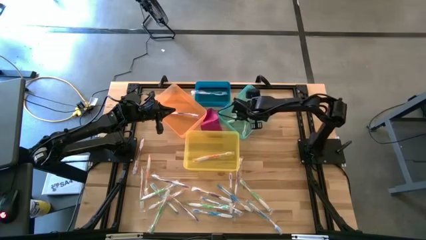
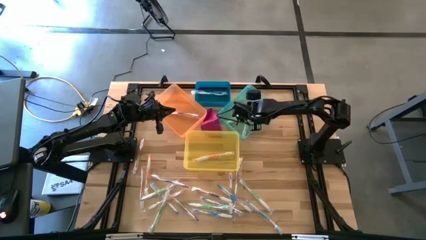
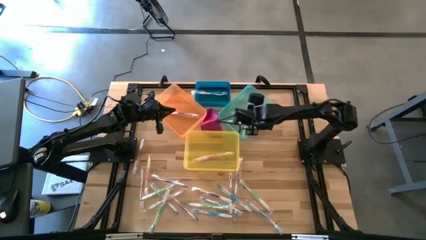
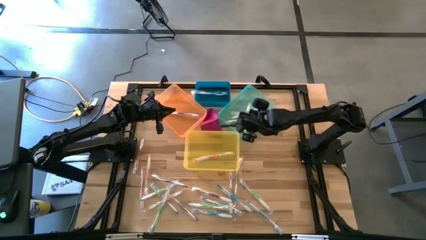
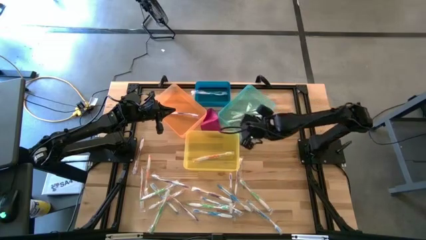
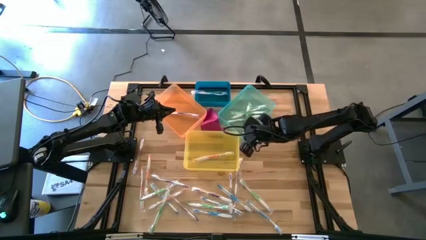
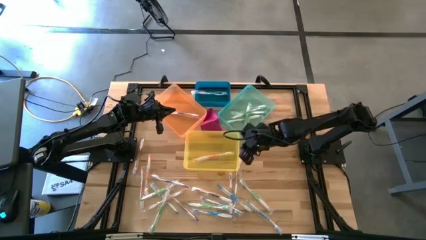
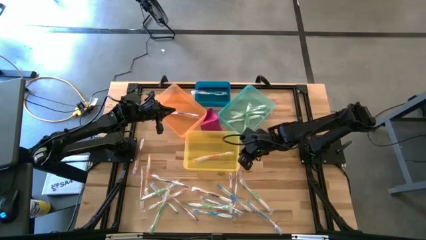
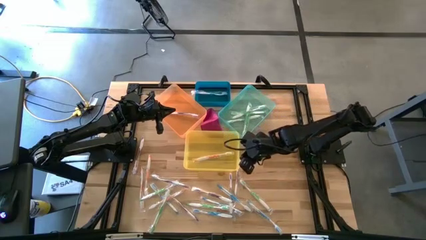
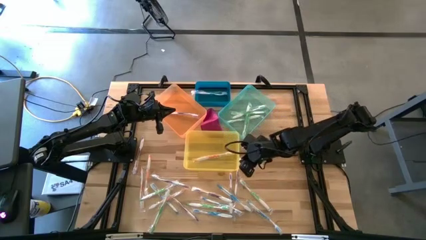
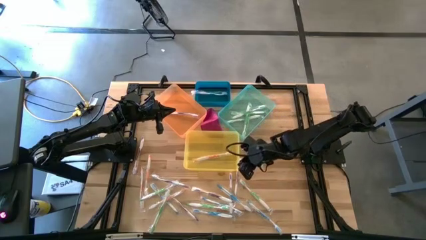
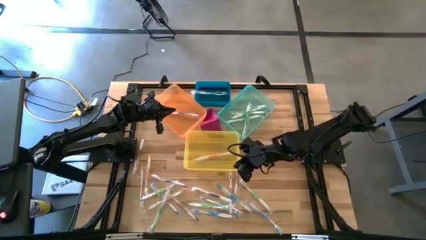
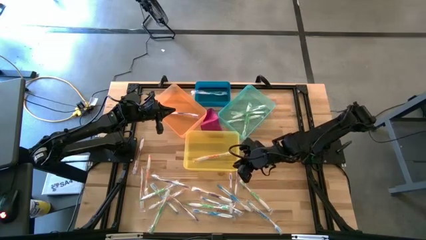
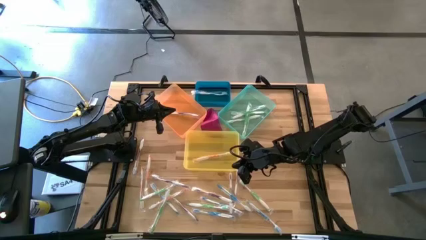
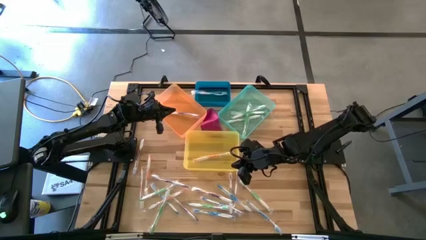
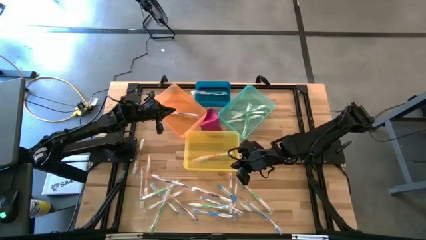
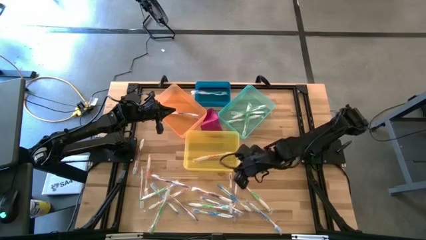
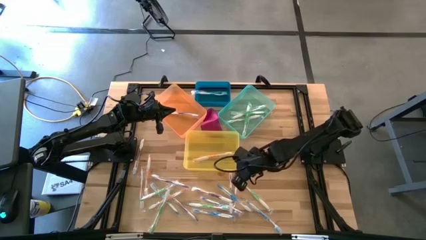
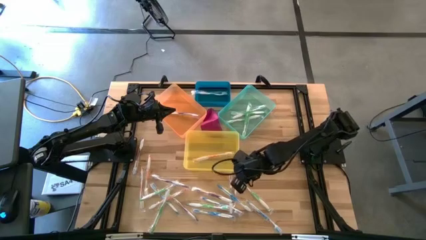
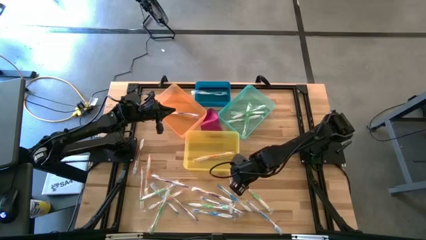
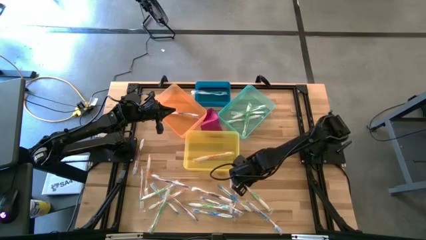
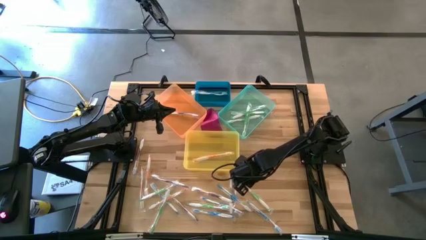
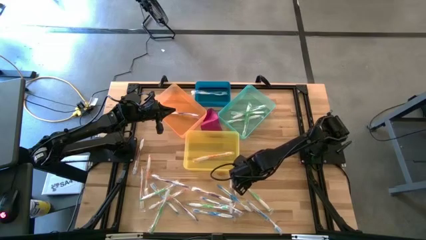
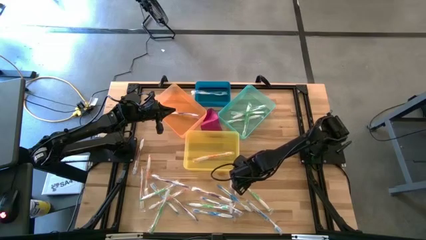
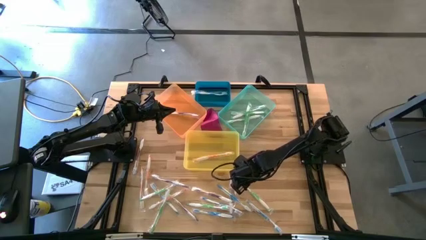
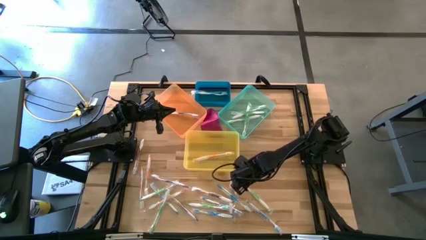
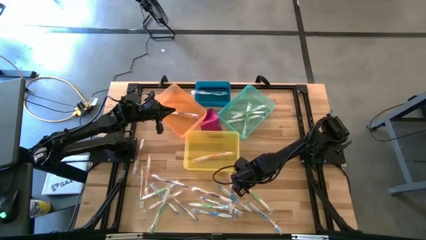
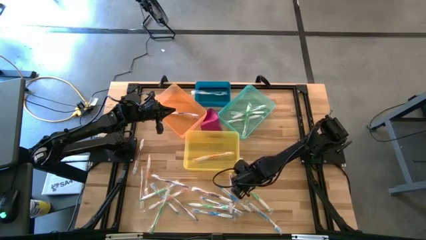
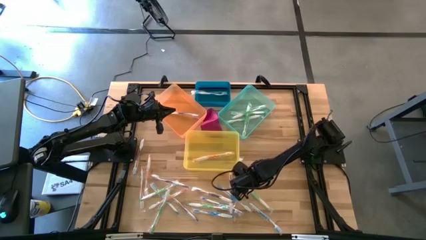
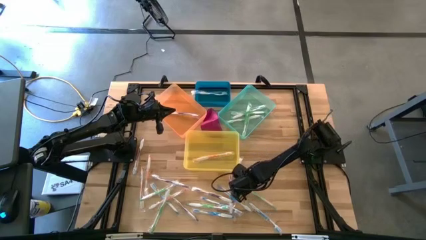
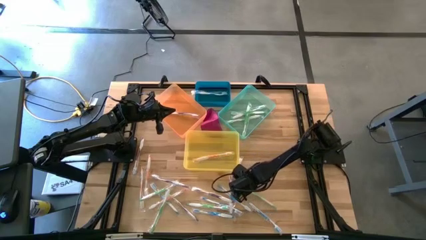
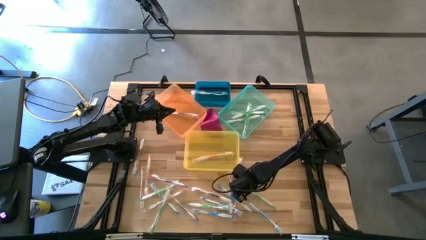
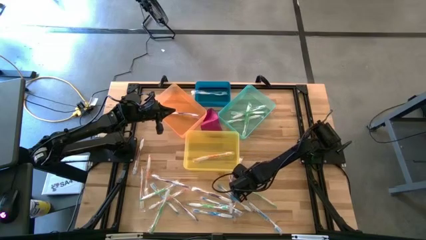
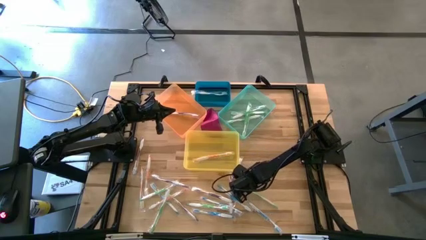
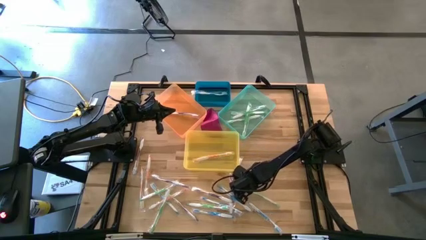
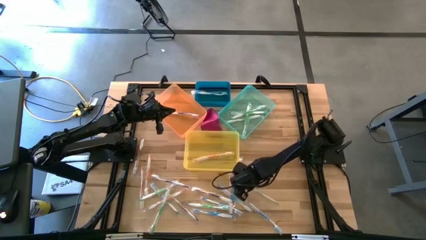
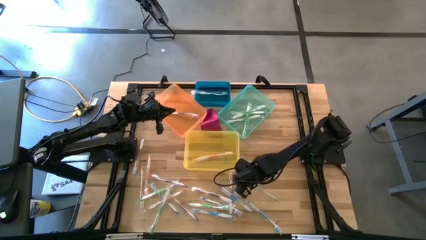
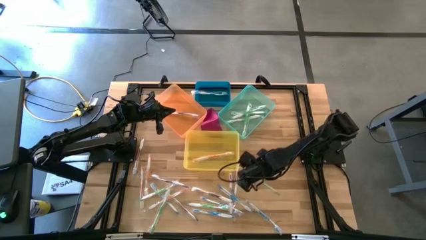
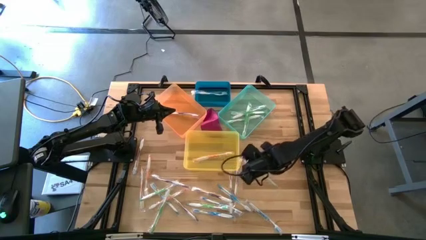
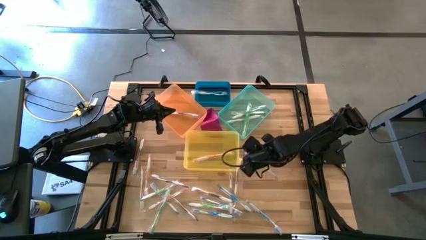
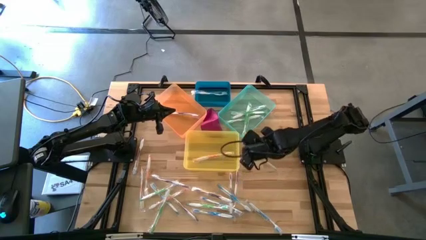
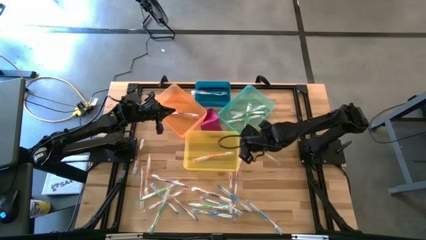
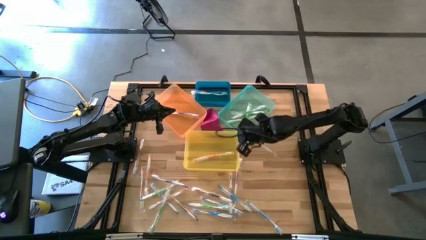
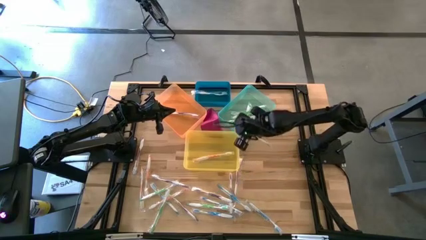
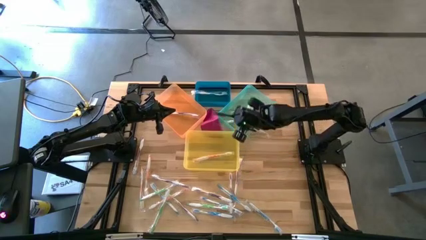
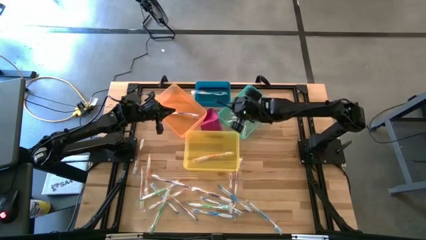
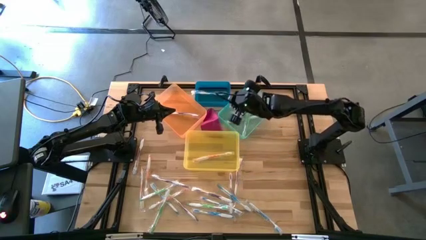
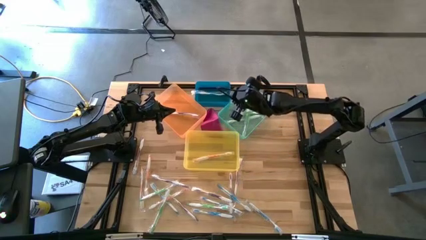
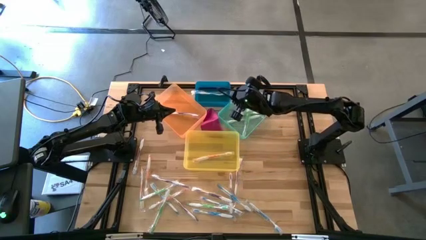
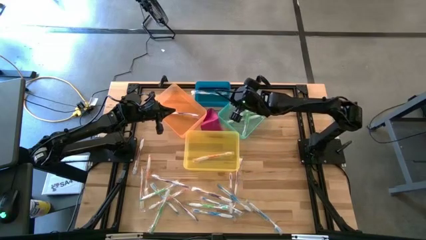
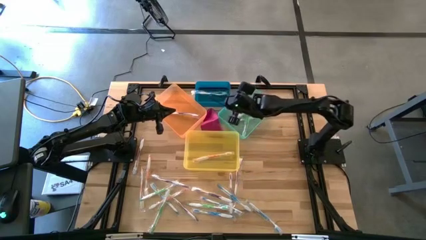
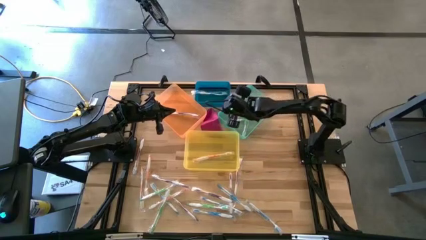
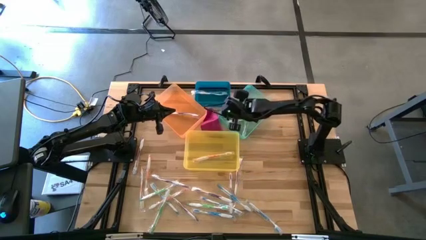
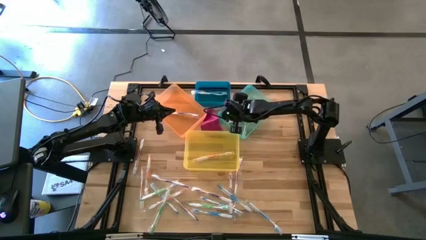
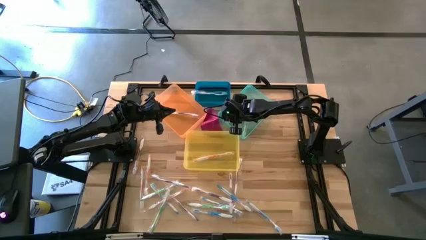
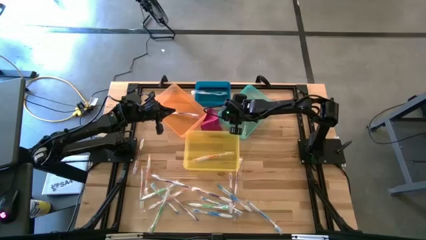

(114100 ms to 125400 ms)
Task: Pick & Place Toothbrushes
Put the green toothbrush into the green bin
